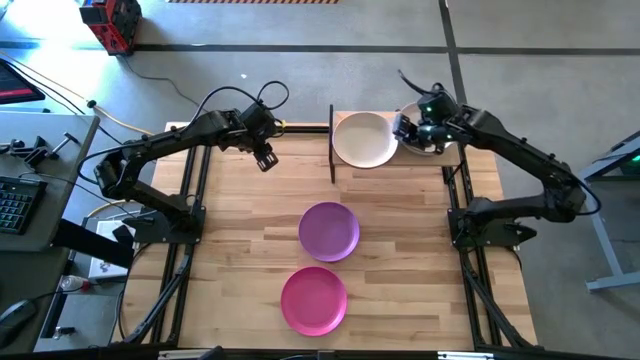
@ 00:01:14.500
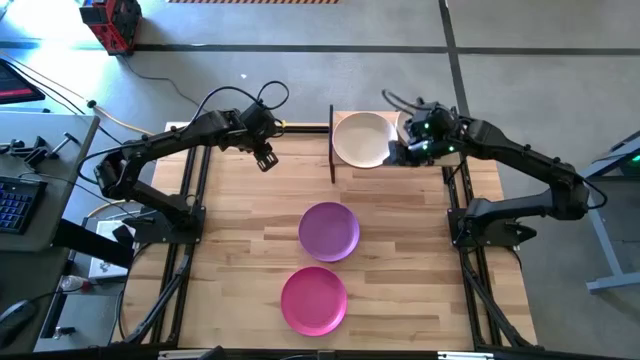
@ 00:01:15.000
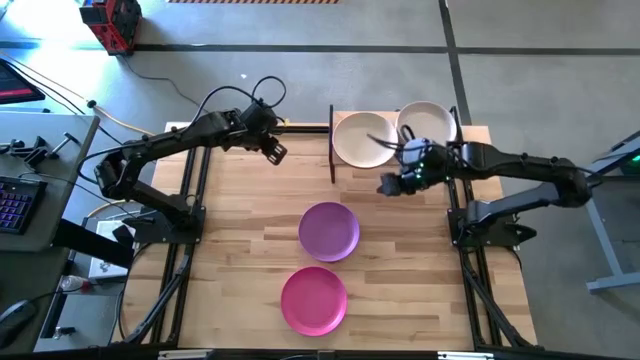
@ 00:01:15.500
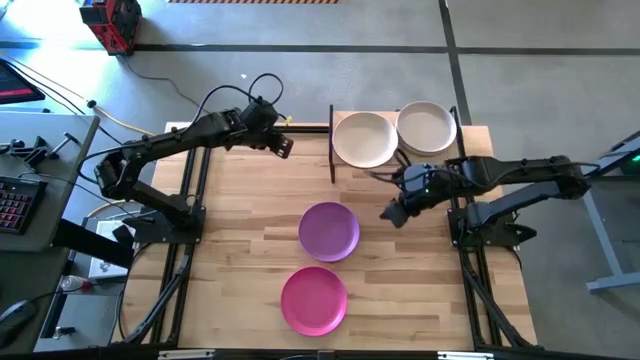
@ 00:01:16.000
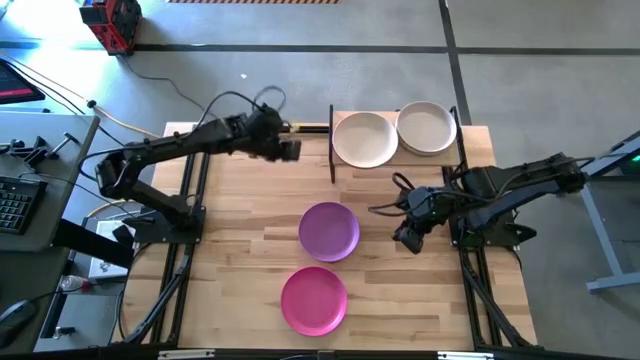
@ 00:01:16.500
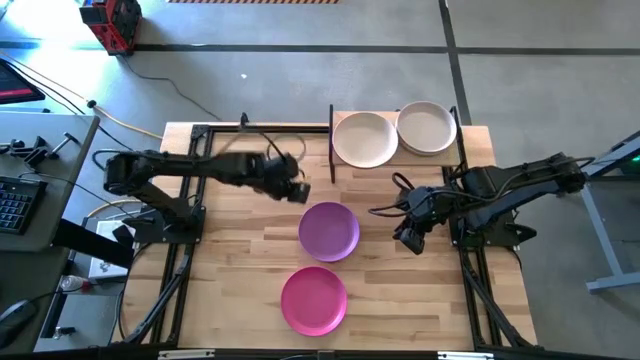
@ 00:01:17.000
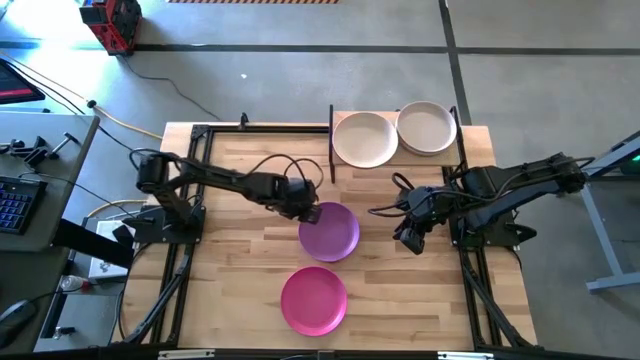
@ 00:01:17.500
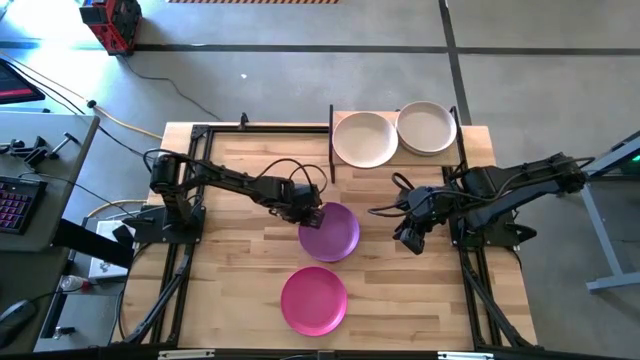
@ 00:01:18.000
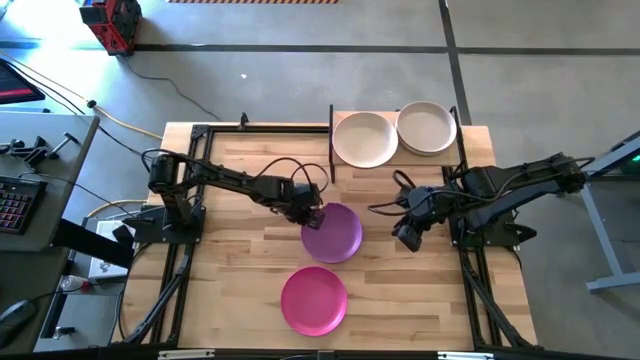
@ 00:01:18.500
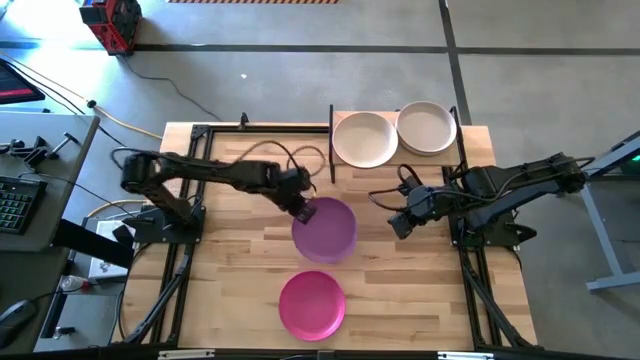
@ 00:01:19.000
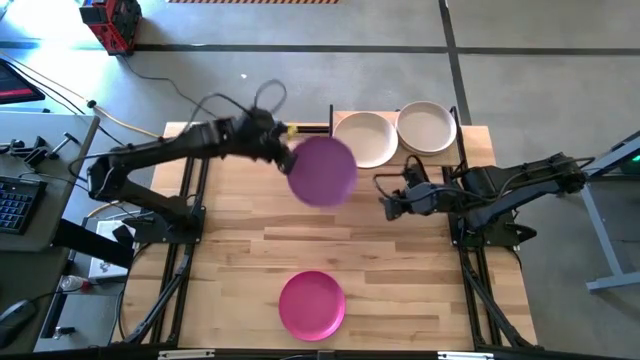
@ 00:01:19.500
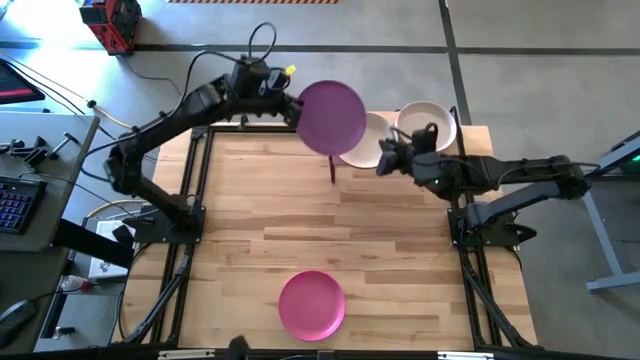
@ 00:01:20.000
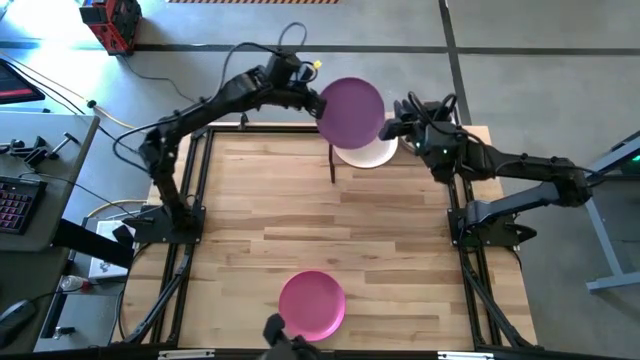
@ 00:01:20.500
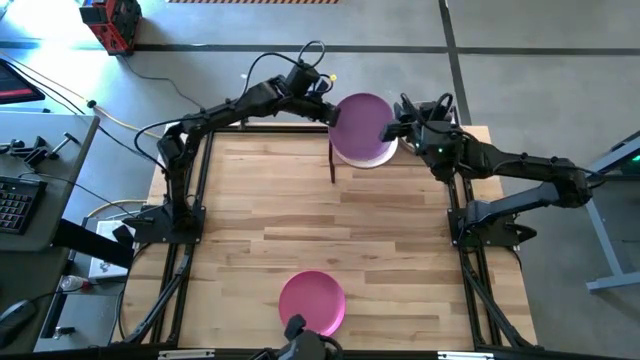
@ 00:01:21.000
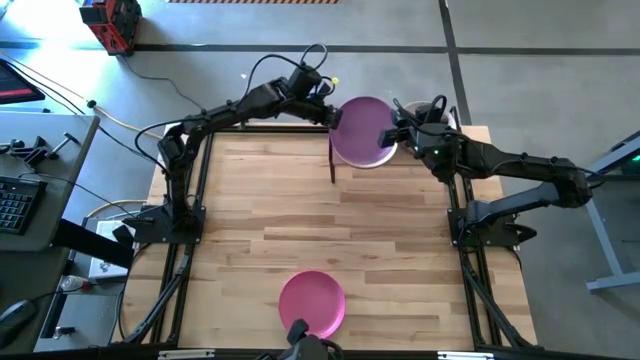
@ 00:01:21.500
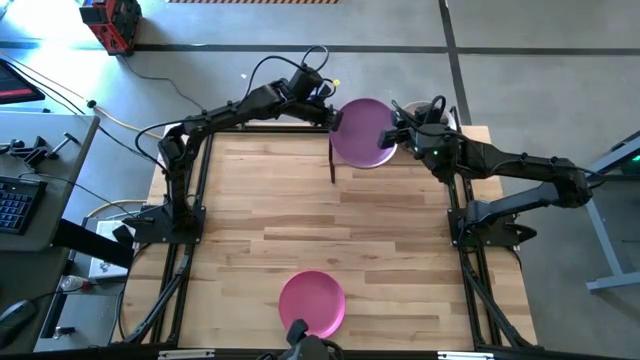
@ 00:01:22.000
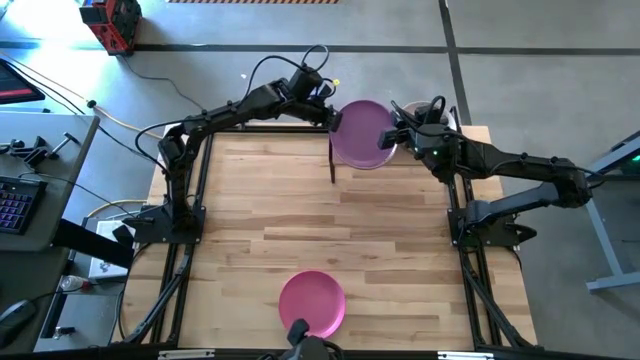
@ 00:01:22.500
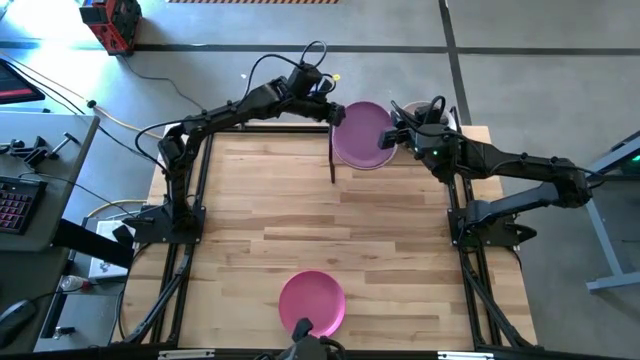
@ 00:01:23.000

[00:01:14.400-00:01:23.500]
Task: Place and stack plates onto a shelf
Stack the violet plate on top of the white plate on the shelf

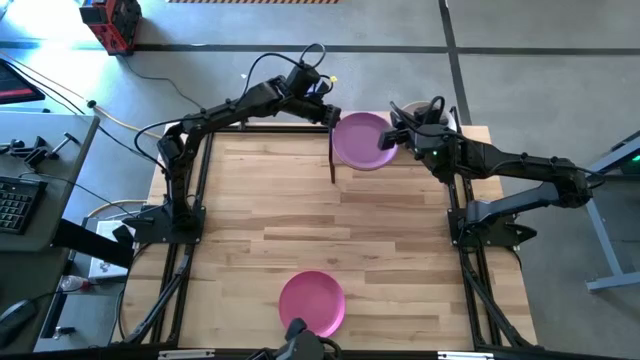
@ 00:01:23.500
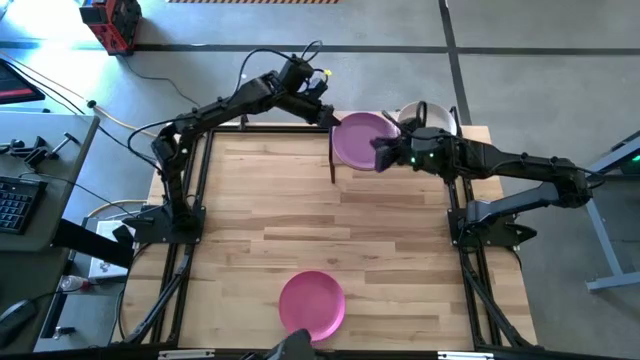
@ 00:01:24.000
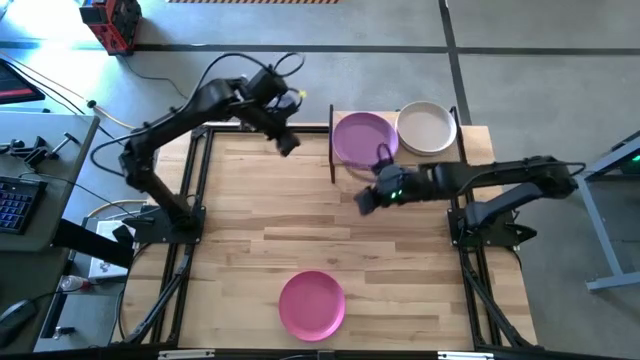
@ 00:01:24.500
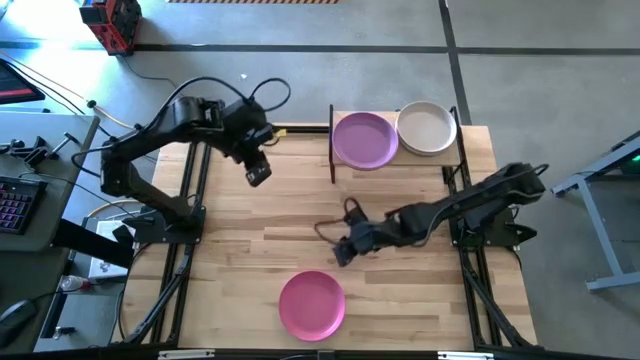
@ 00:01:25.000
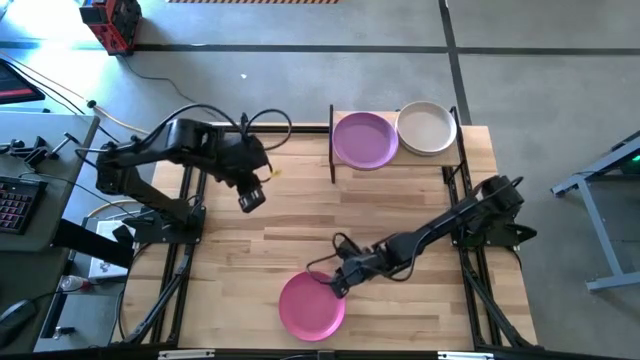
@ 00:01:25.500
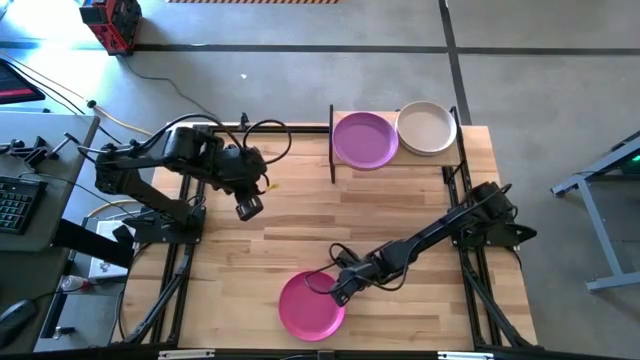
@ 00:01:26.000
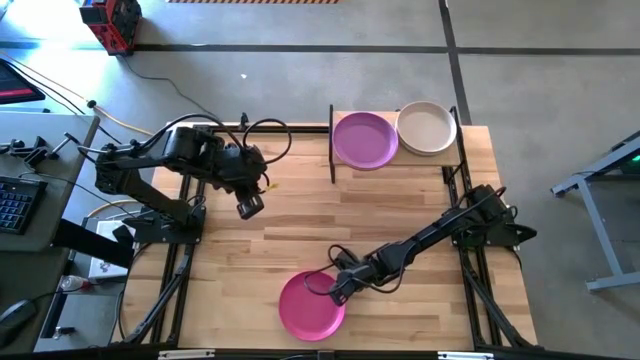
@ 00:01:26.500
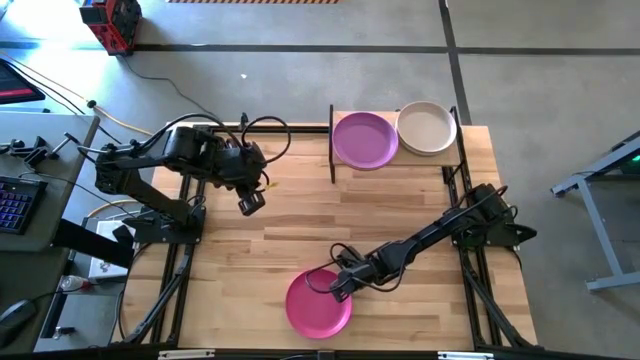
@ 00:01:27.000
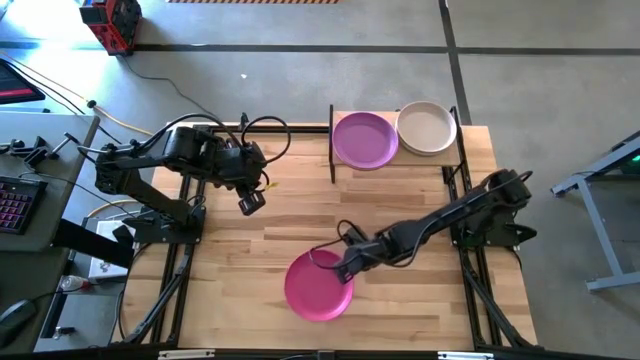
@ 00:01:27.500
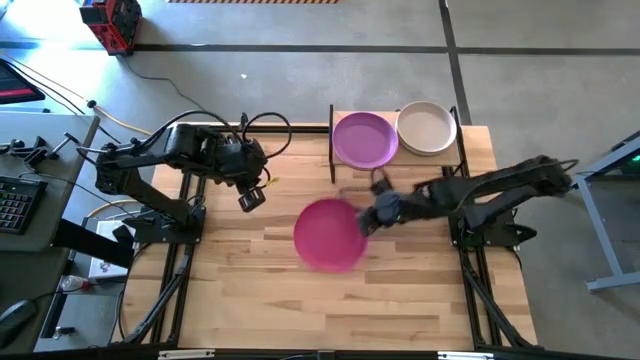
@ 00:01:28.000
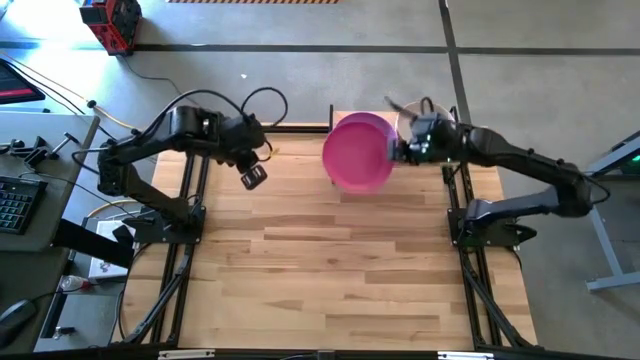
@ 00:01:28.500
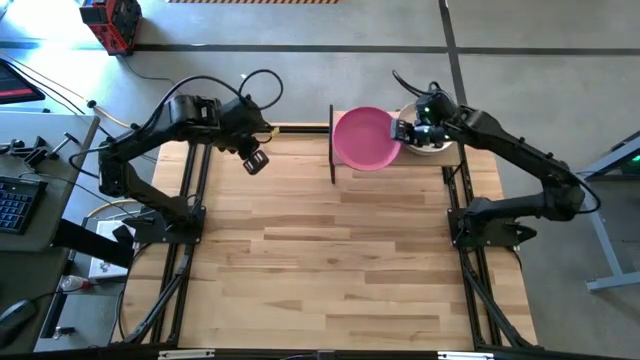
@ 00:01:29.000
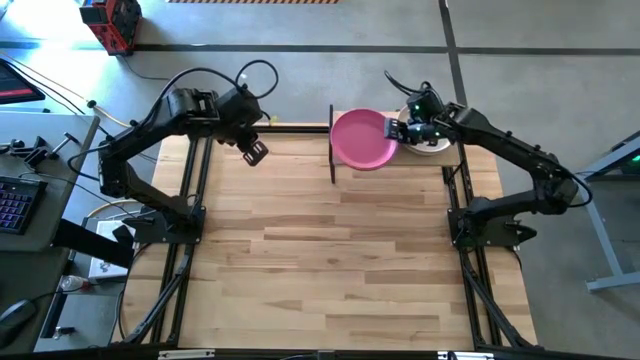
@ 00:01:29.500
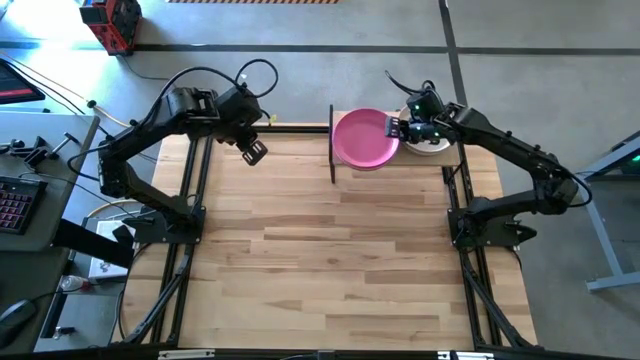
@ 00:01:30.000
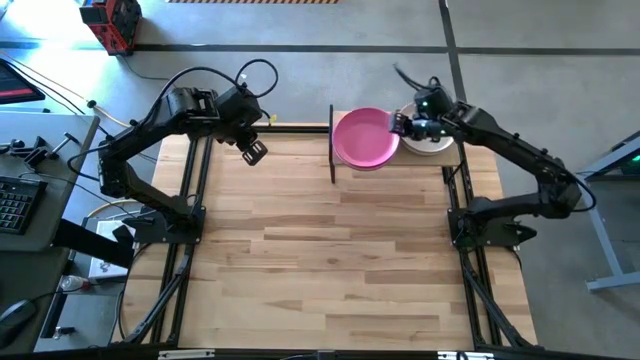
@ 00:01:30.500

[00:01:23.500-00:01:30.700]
Stack the pink plate on top of the violet plate on the shelf

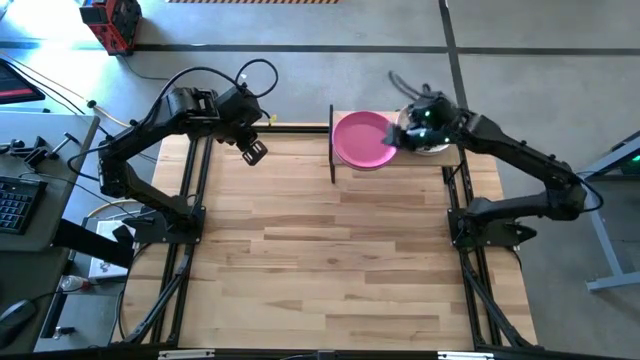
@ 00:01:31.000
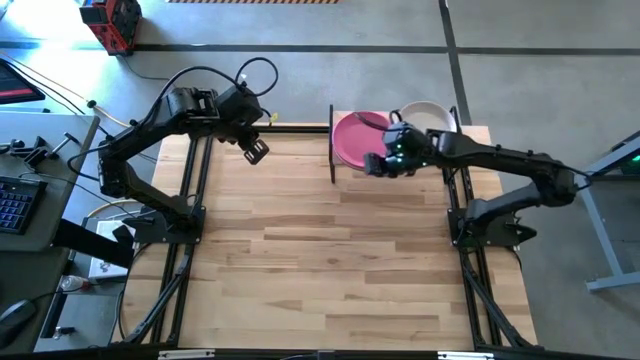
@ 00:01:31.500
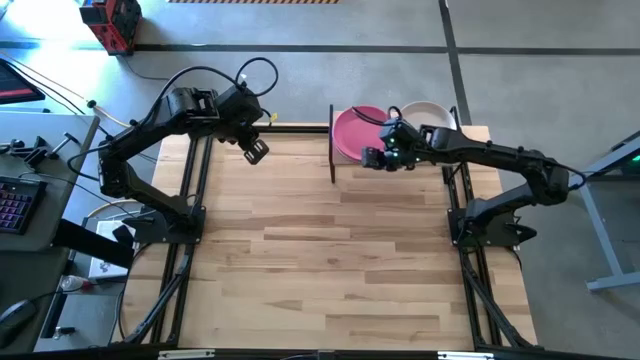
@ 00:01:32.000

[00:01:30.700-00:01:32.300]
Adjust the stacked plate on the shelf

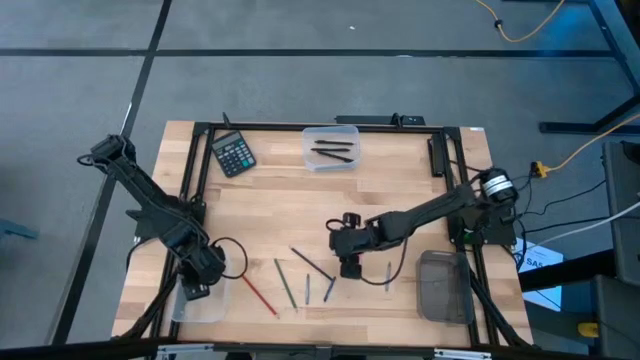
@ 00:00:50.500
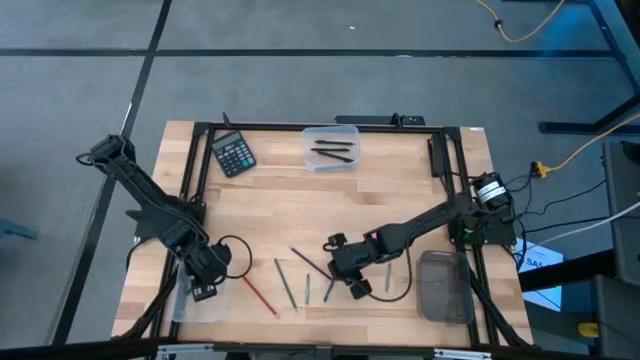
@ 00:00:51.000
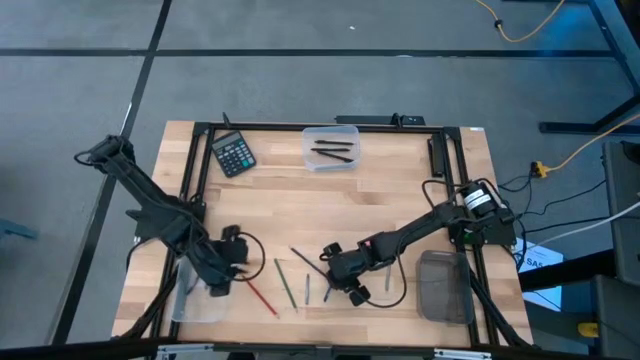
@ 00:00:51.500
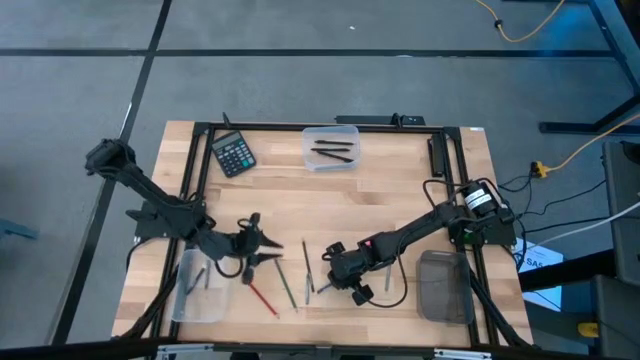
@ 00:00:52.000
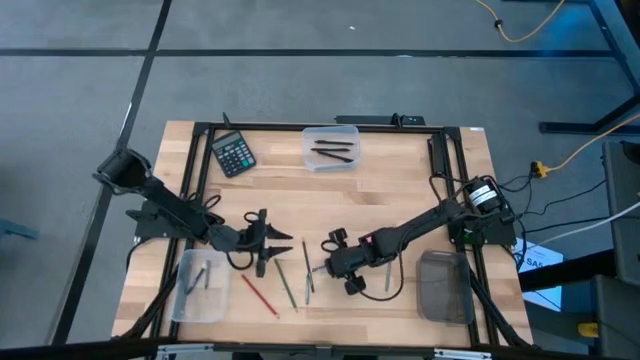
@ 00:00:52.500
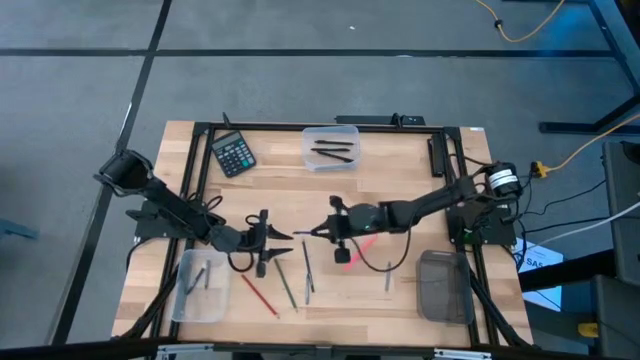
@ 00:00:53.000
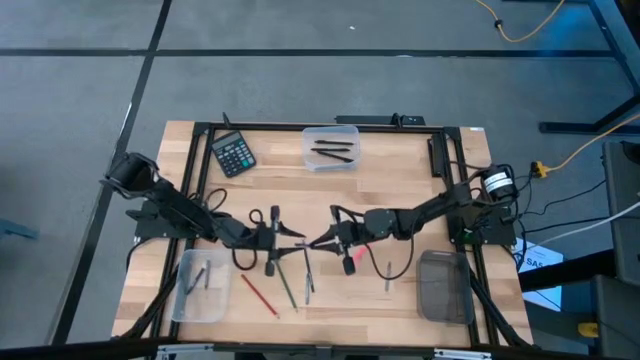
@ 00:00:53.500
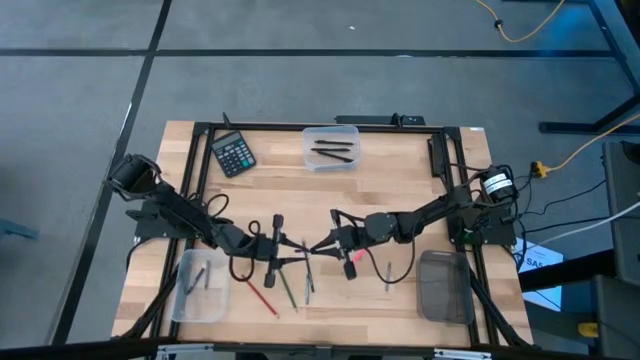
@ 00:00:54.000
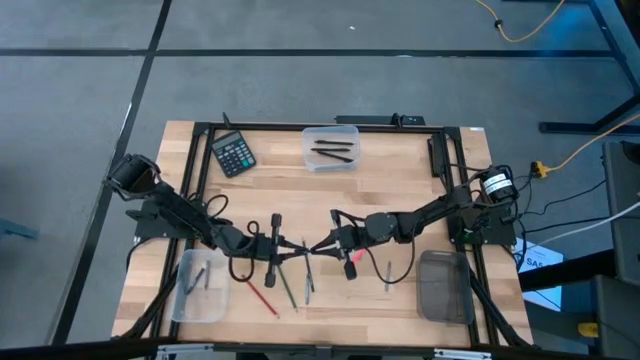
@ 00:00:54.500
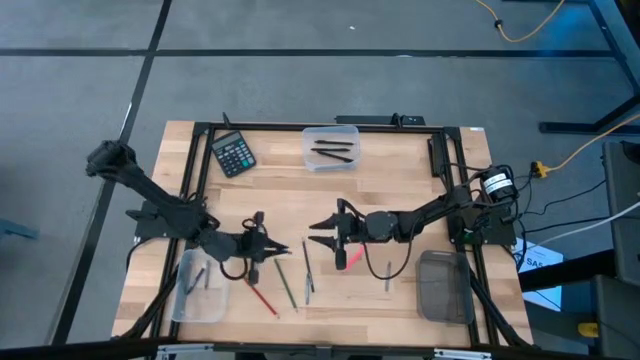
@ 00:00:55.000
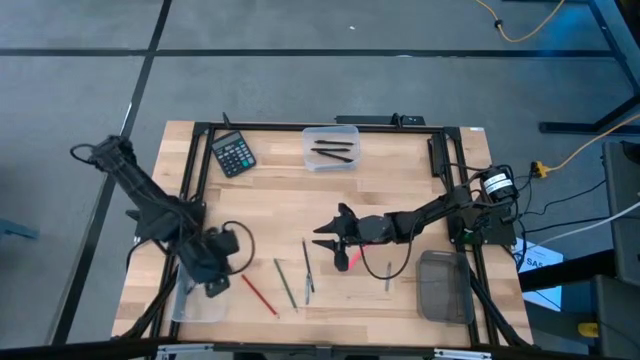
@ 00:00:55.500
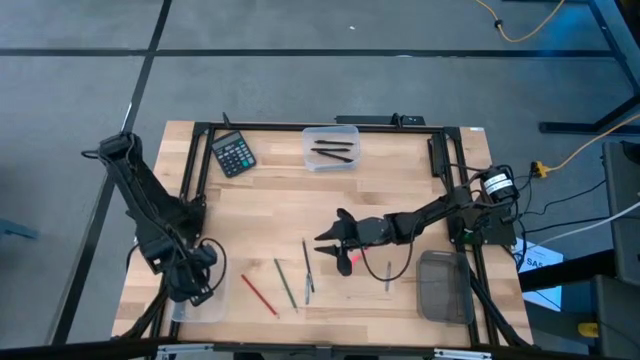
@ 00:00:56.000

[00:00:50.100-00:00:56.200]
Task: Sort crayons/erasers/pens/pencils in bins
Put the blue crayon into the bottom transparent bin
